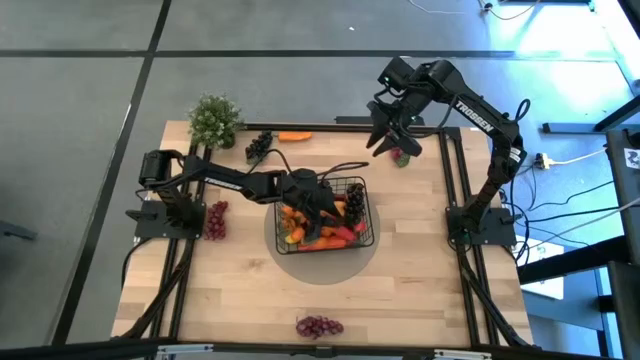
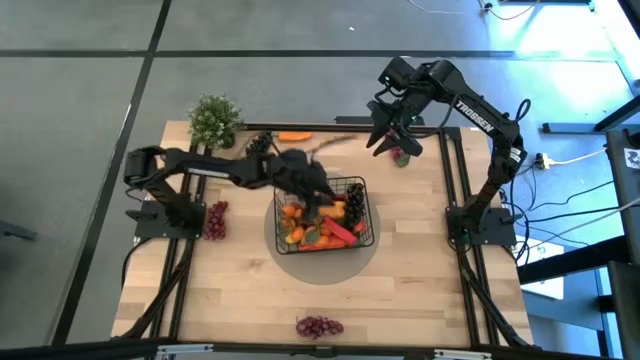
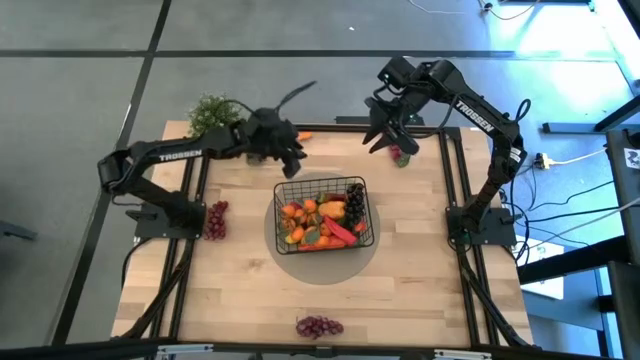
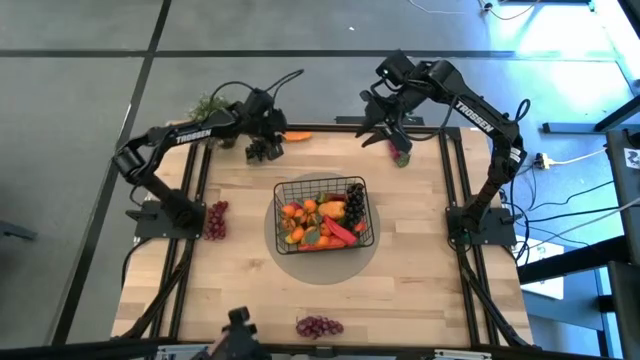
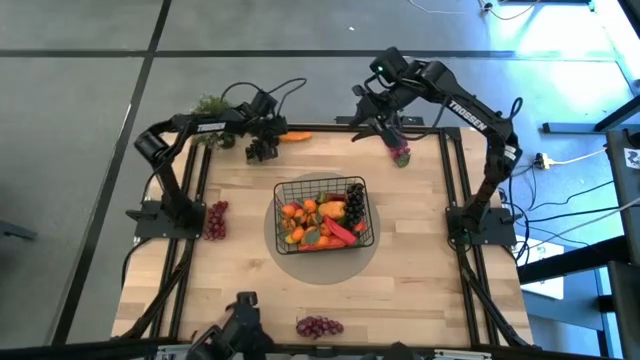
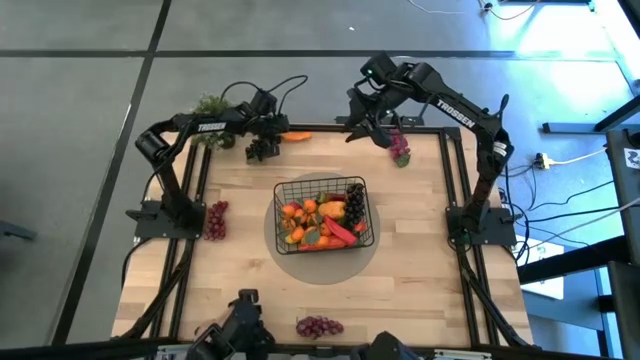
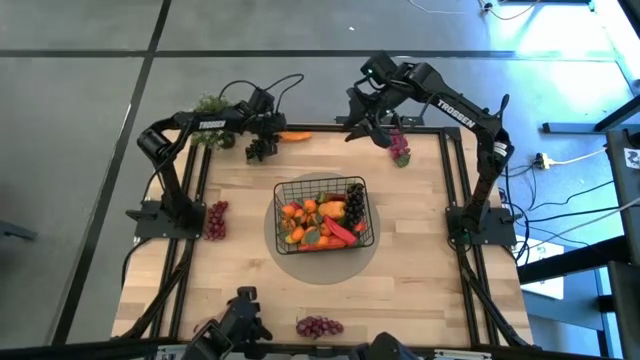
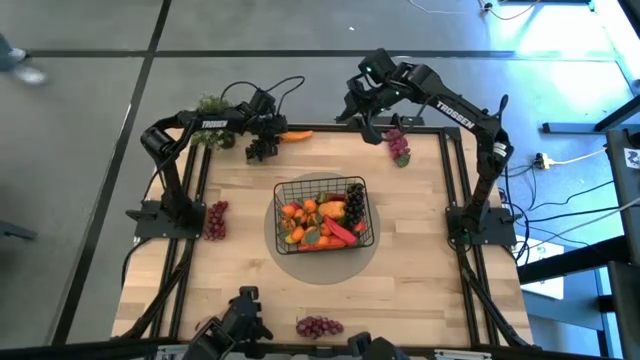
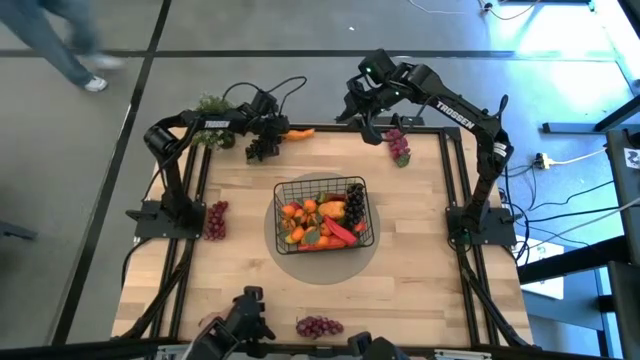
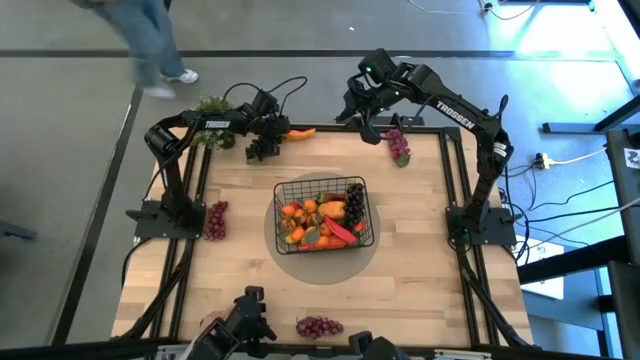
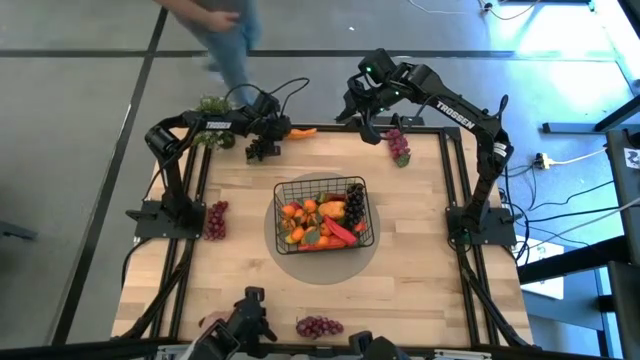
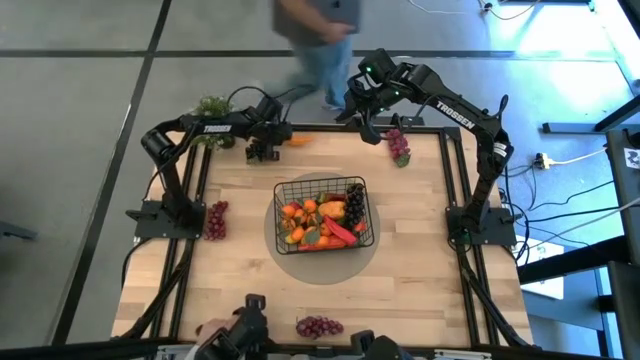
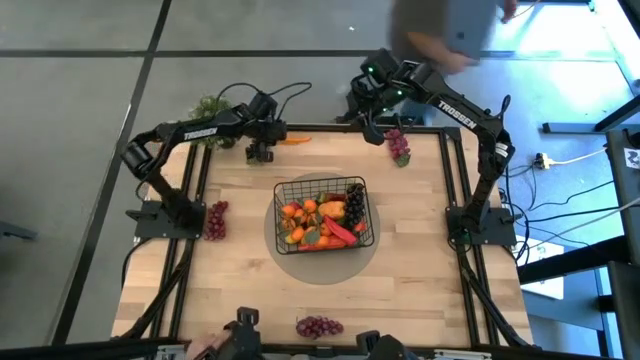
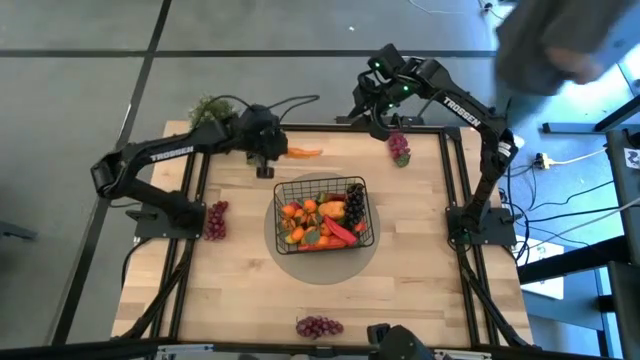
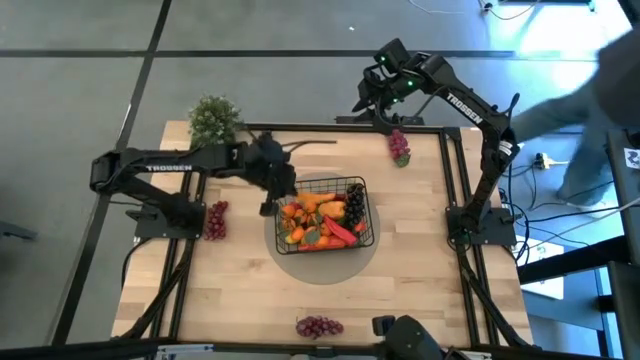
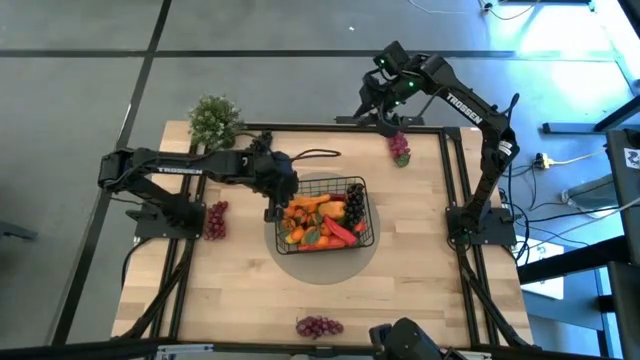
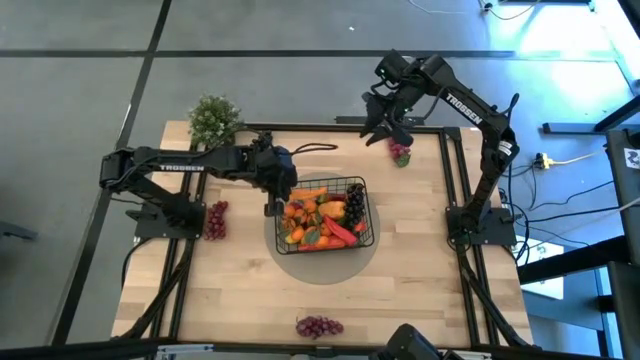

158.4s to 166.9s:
Task: Build produce basket
Put the yellow pepper into the wire basket

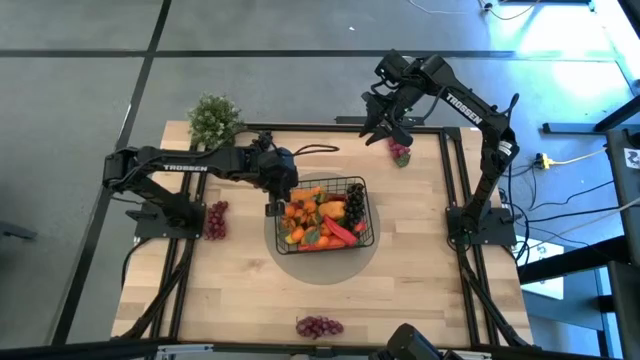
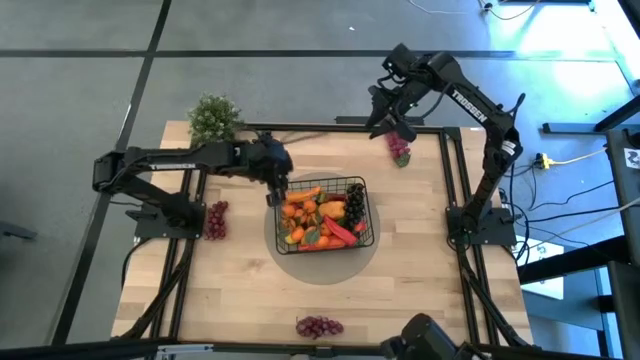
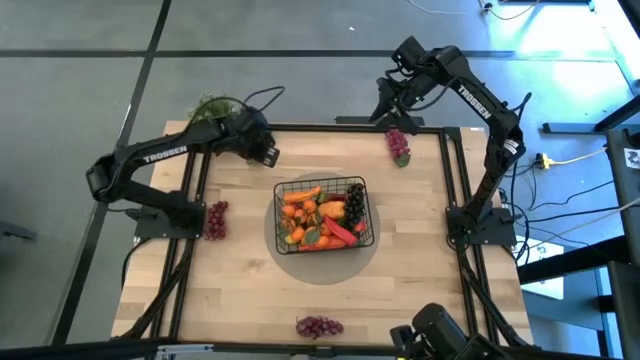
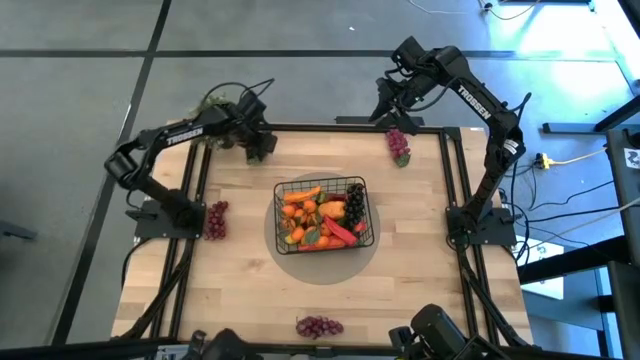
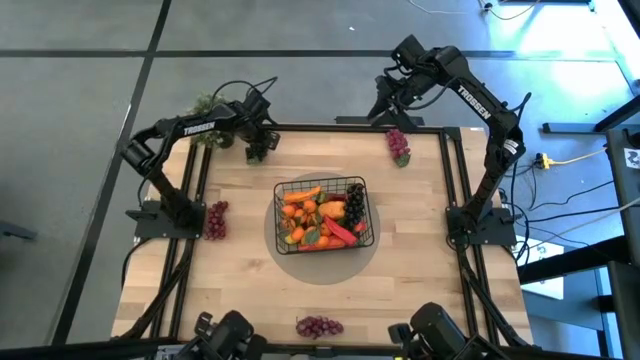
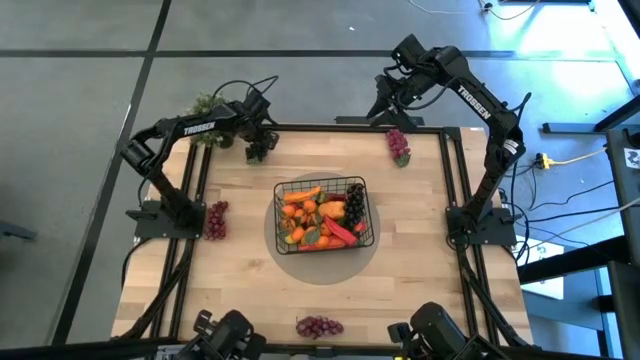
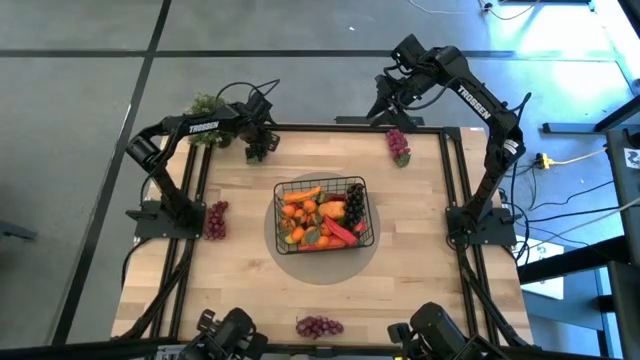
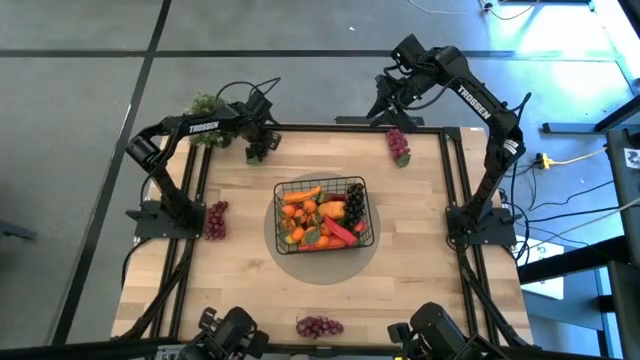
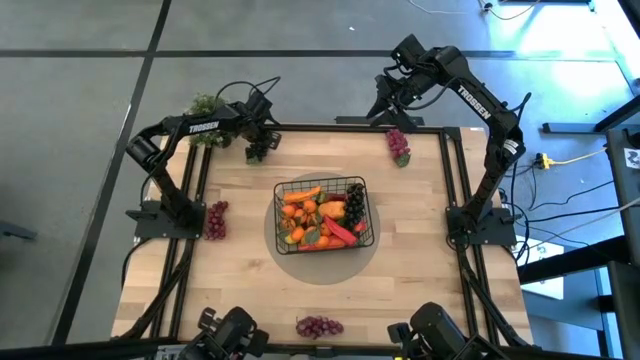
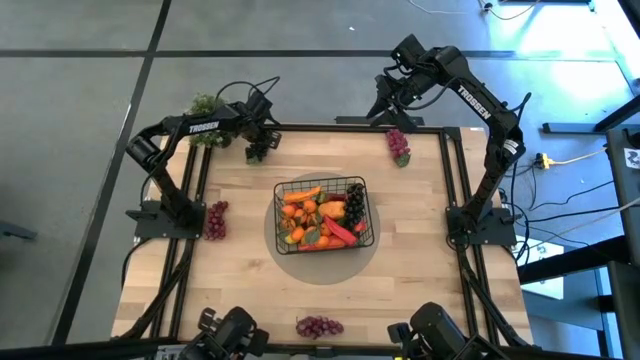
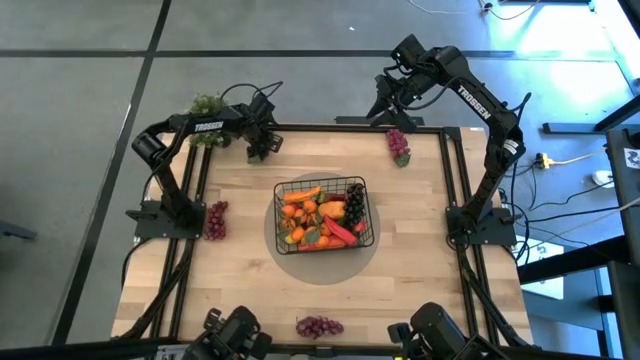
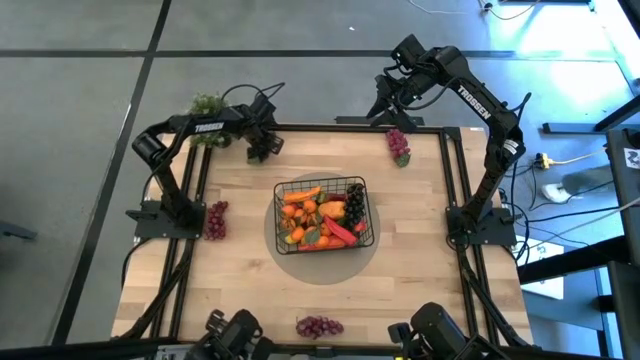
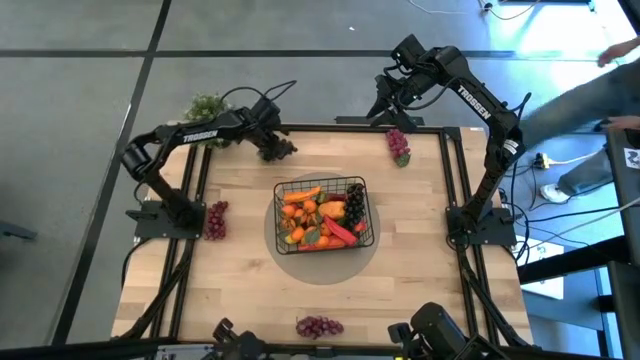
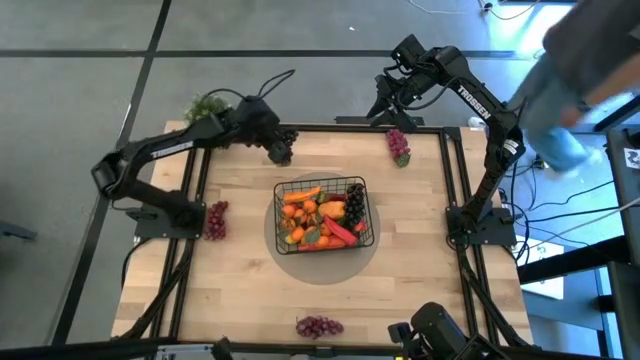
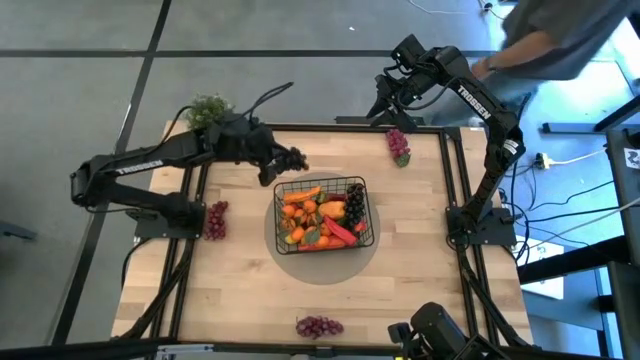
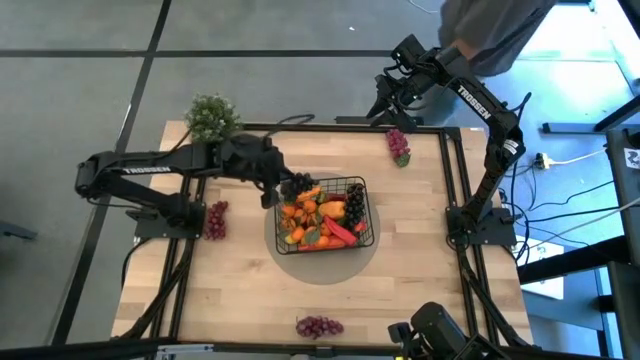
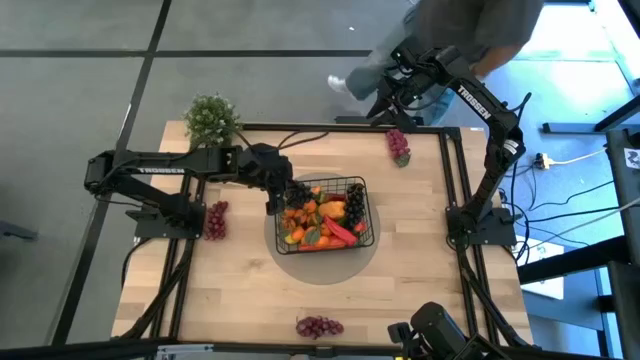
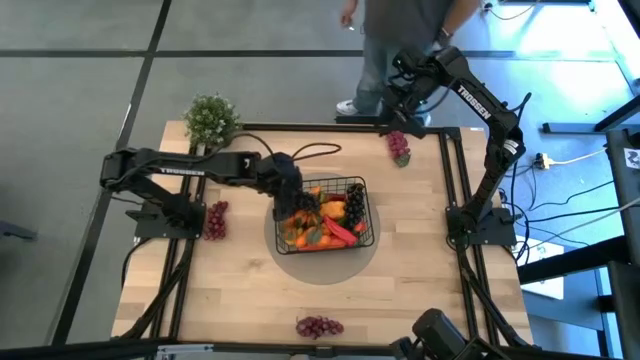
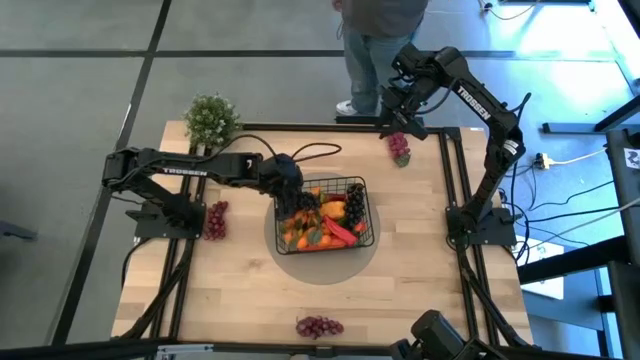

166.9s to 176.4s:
Put the dark blue grape into the basket

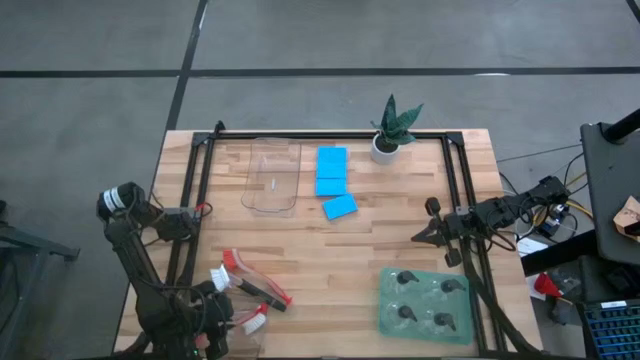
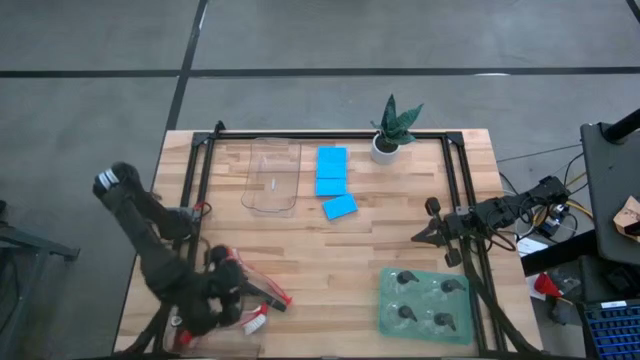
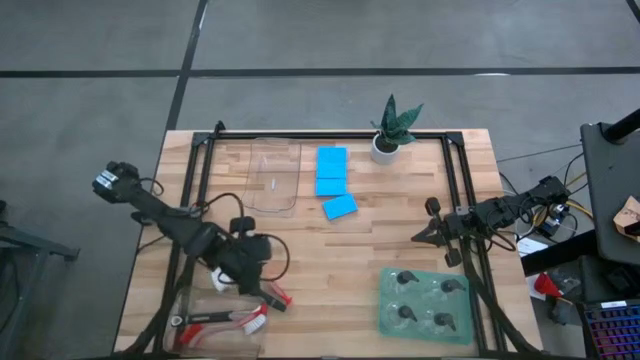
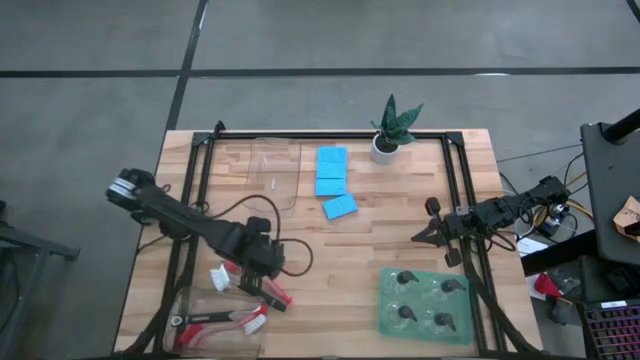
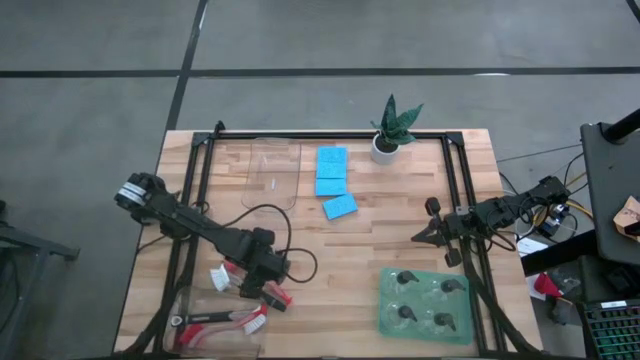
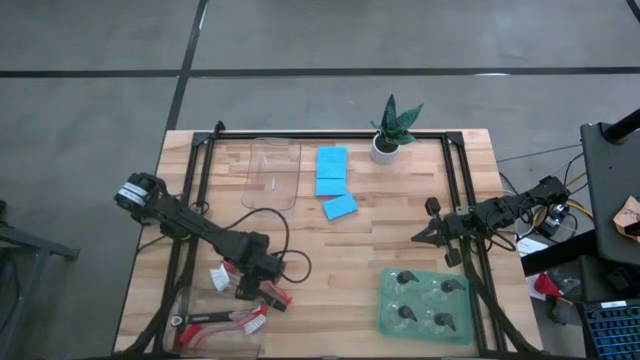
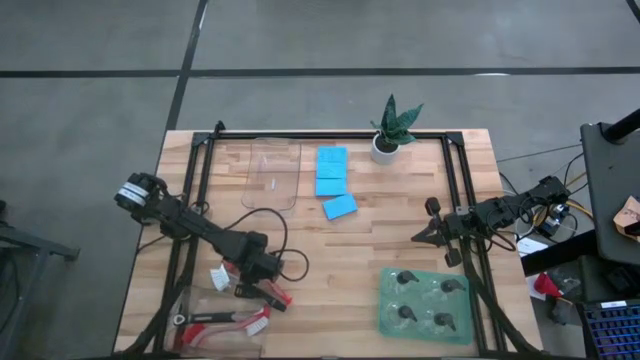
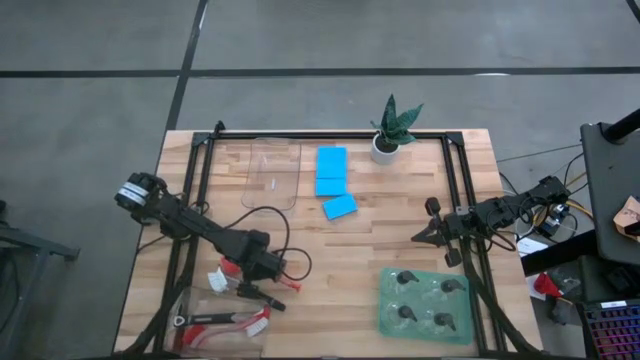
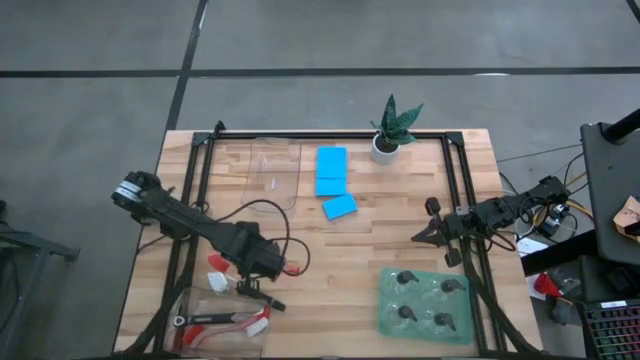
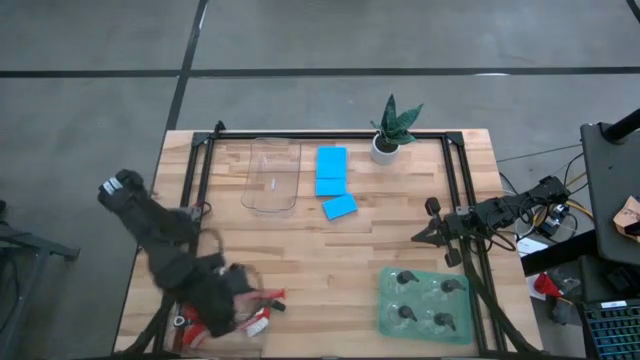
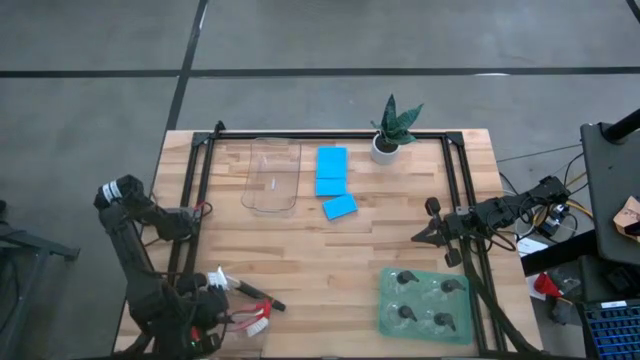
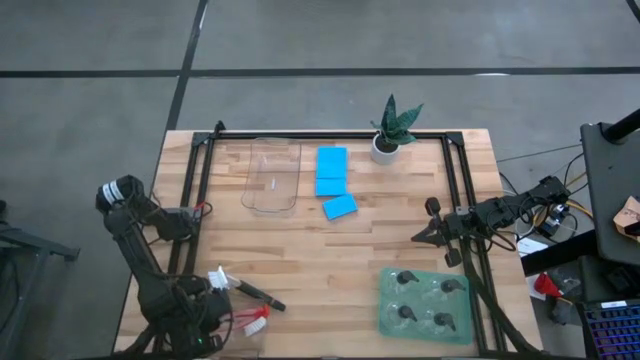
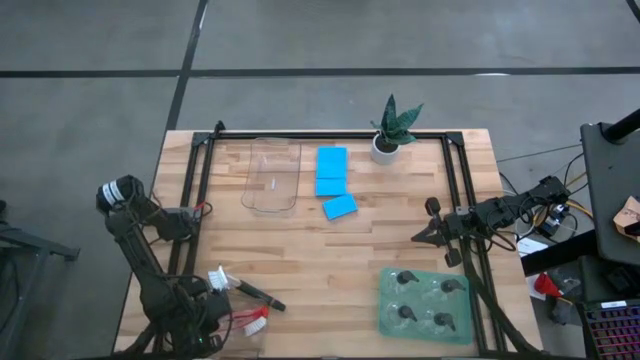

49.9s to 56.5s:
Task: Pick & Place Kitchen Sink Supplies
Put the red dish brush into the bottom transparent bin
